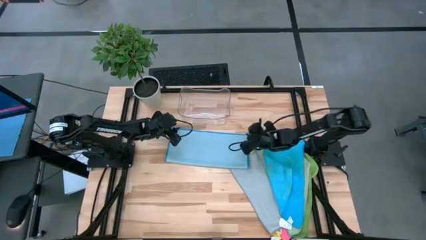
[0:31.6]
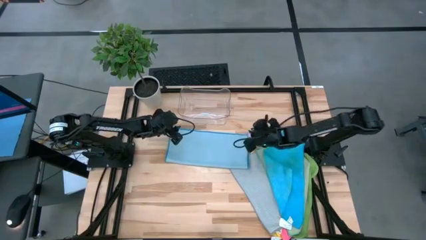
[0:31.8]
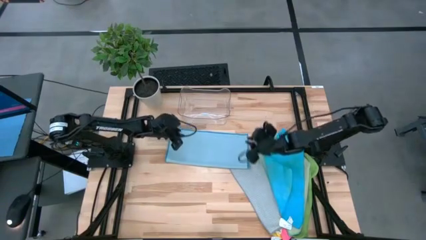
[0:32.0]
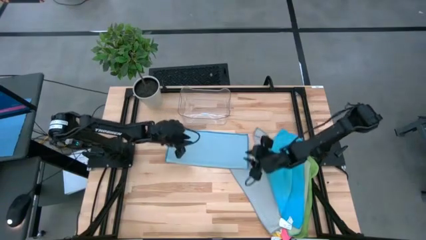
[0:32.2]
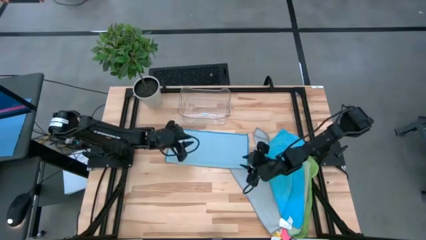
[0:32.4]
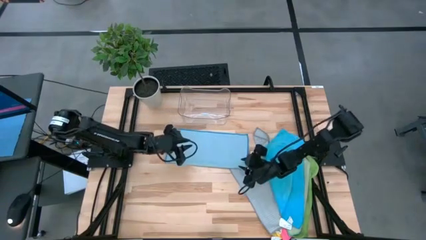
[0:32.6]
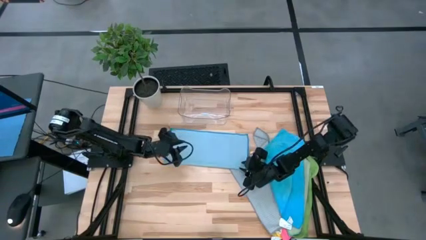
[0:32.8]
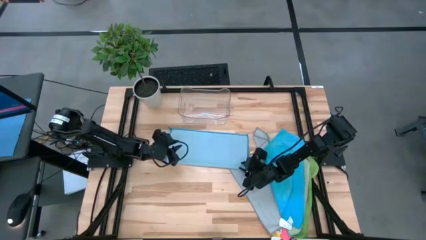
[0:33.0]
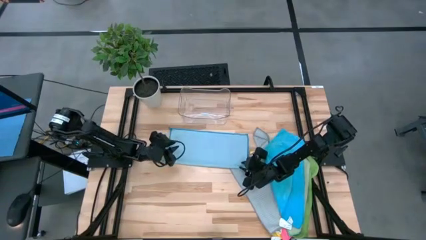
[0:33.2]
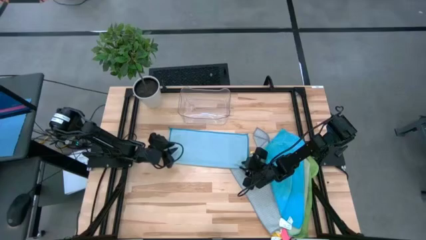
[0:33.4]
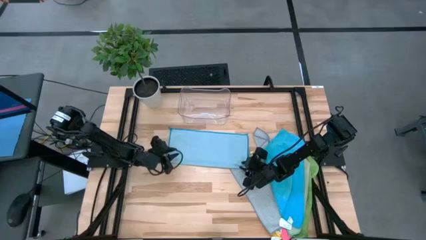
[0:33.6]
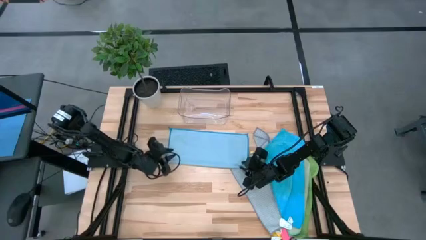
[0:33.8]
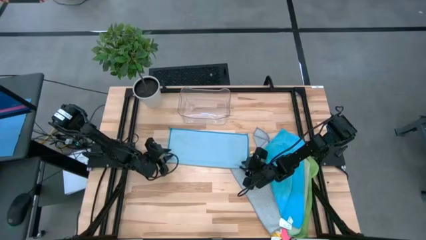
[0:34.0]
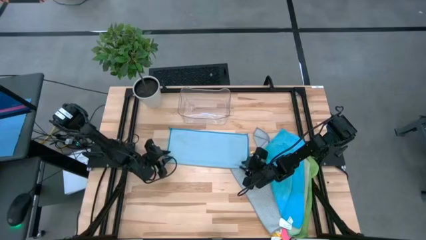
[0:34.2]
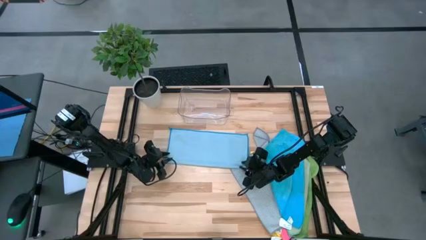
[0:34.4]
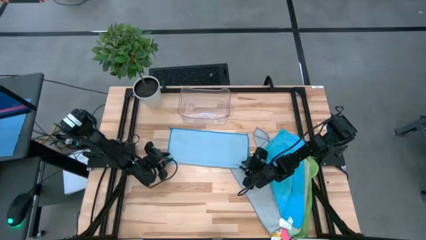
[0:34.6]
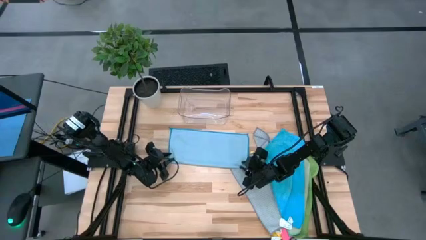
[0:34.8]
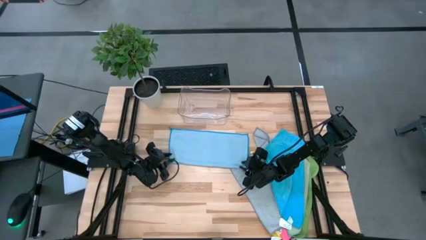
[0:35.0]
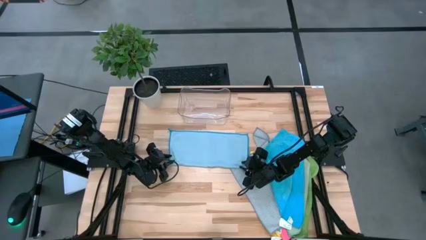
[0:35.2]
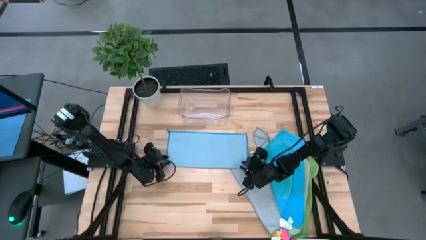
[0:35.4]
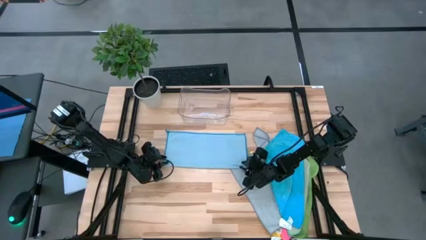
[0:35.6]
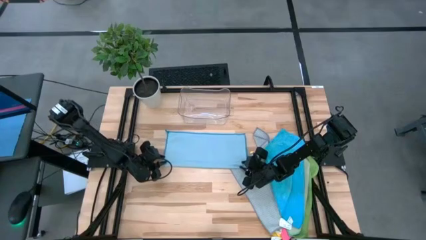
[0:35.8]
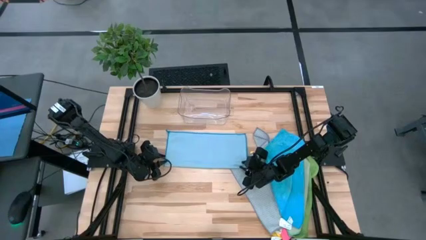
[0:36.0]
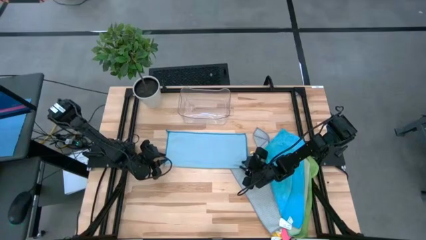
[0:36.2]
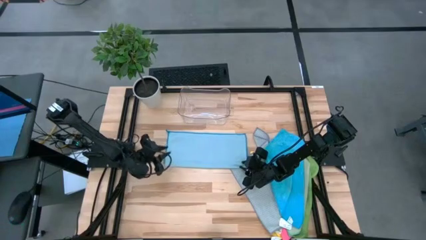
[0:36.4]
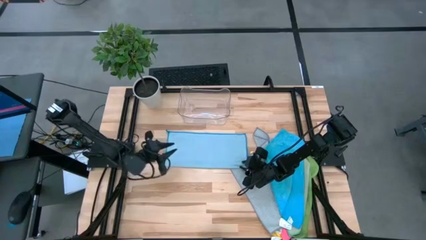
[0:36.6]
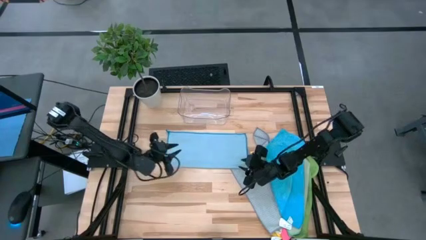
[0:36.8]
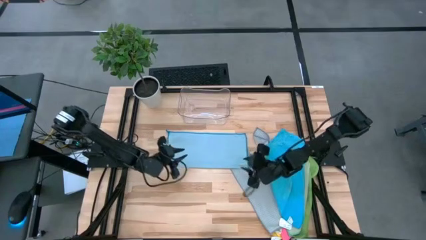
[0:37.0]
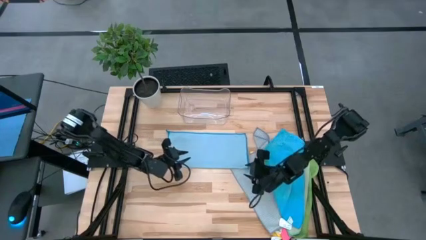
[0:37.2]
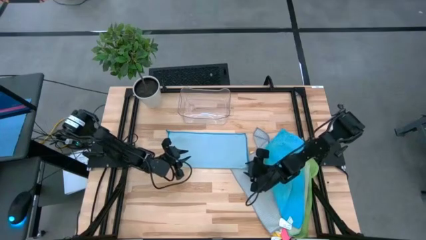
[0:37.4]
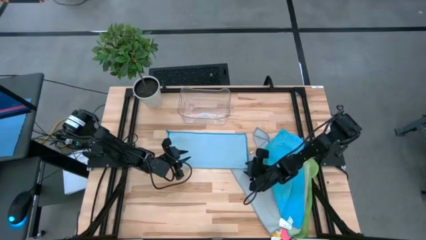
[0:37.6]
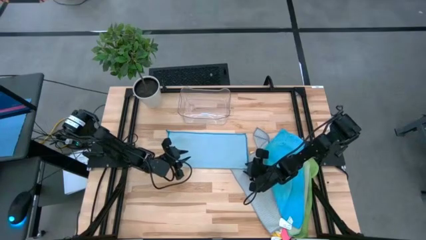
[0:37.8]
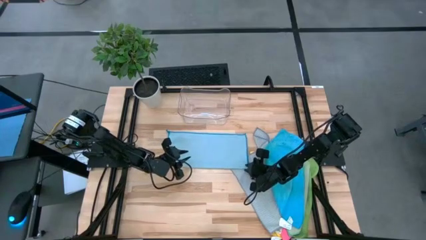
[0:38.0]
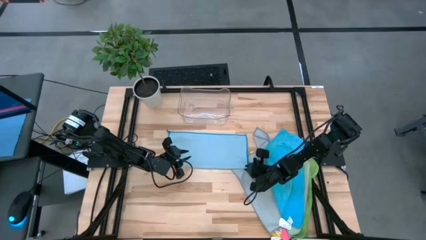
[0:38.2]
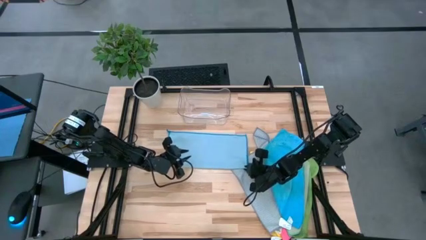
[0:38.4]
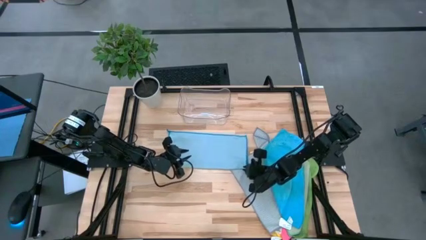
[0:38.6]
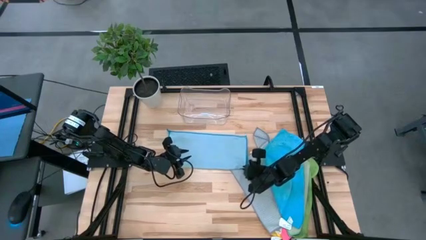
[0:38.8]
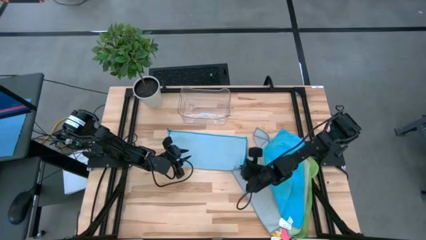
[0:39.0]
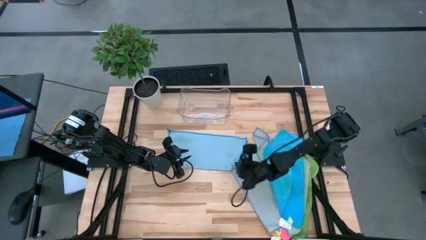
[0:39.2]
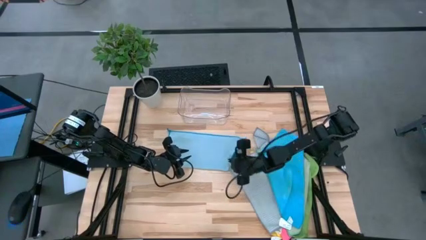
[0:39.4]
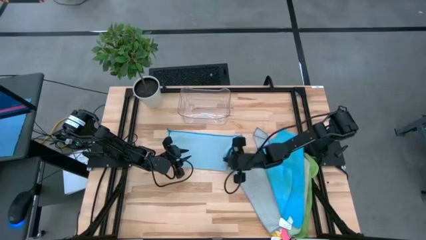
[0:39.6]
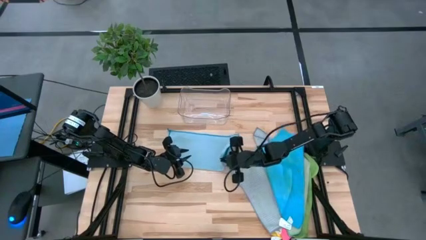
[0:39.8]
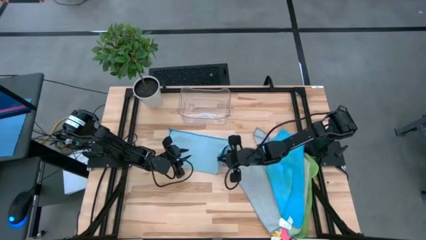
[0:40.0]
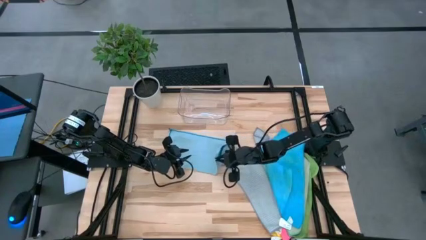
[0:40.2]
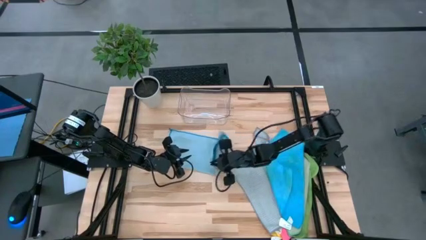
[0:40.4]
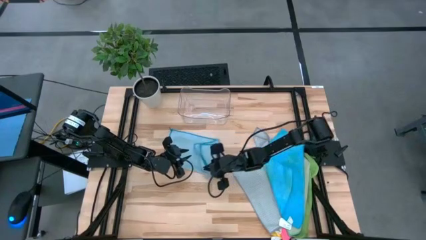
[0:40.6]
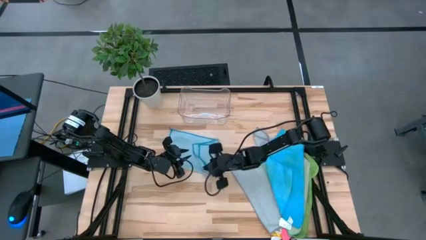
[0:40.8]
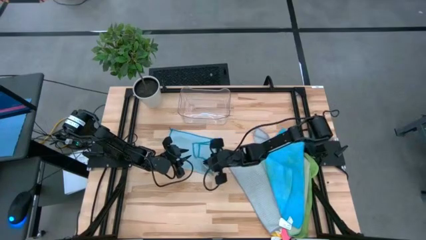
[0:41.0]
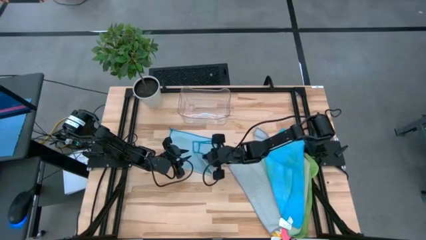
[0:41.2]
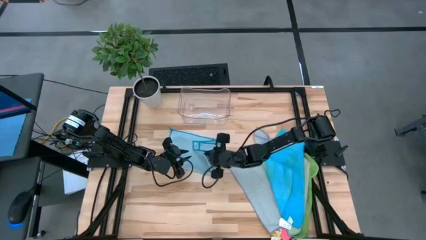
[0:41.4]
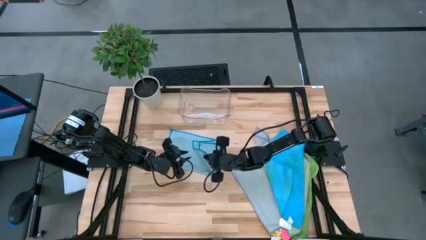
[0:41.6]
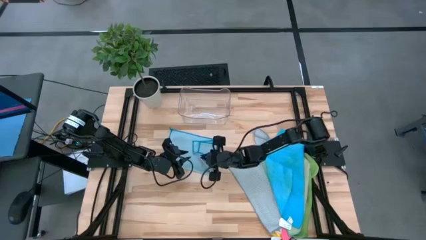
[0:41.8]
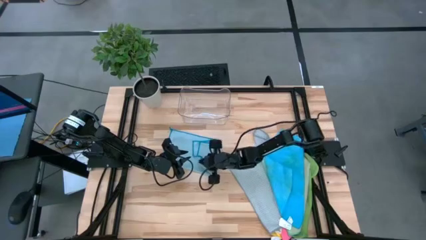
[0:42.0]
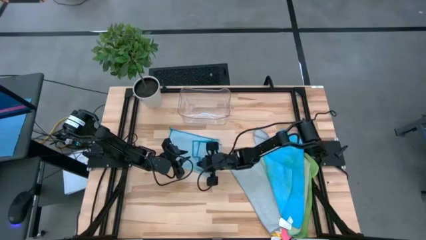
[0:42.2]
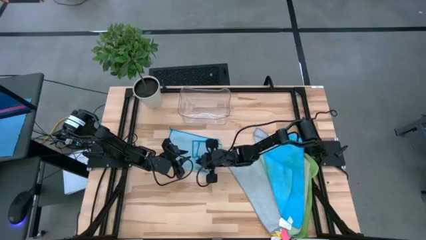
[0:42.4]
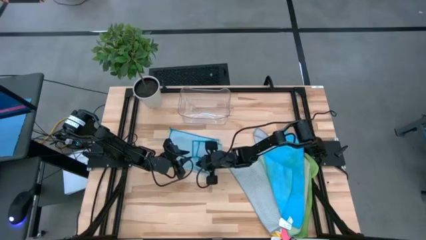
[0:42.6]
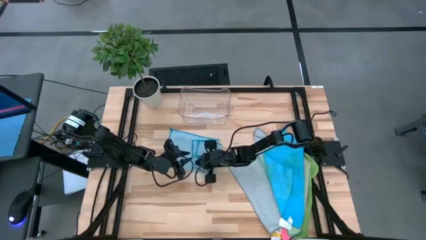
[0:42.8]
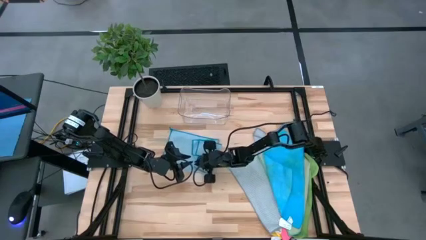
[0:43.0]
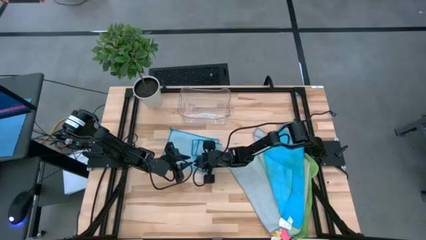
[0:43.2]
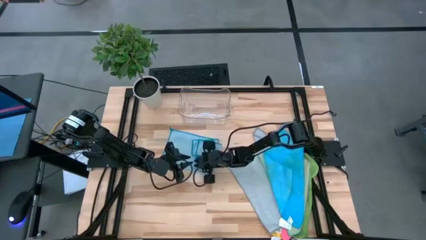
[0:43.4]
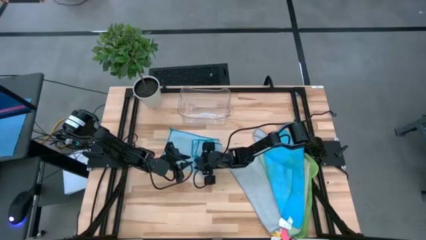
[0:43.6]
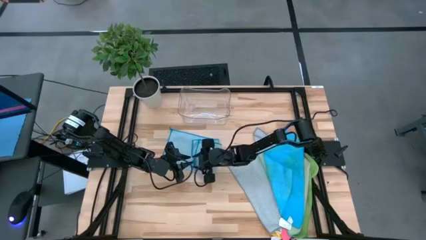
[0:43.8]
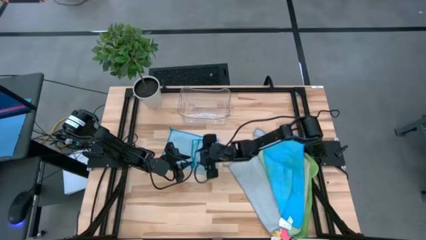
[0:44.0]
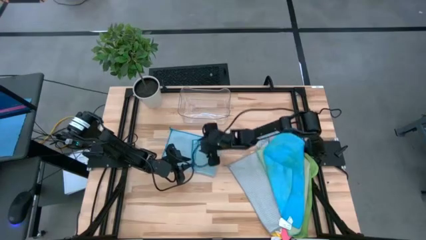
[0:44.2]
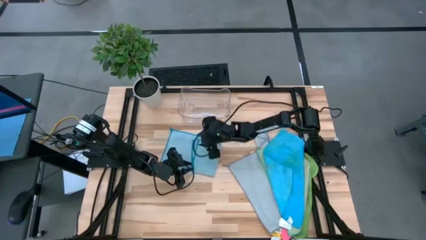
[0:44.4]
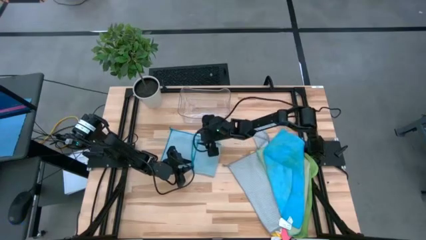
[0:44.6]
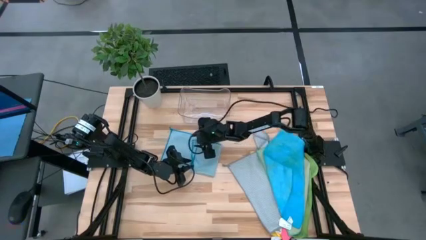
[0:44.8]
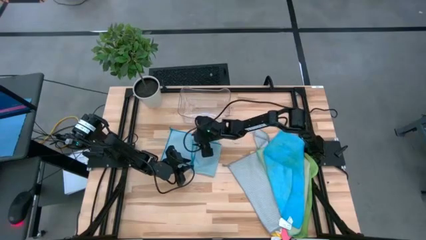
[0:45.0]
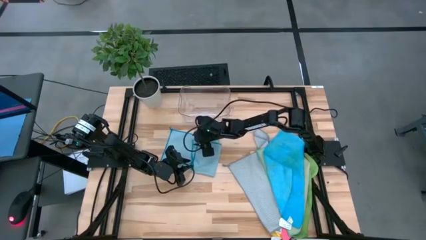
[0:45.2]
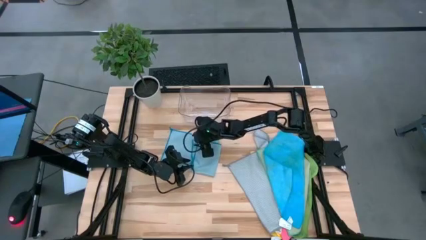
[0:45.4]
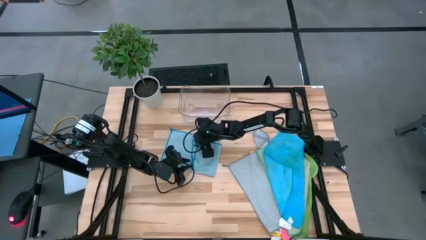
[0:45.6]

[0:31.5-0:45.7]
Task: Fold microfiber towels
Fold the light blue microfiber cloth
